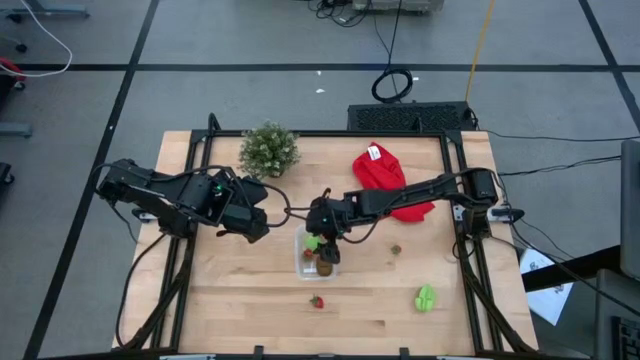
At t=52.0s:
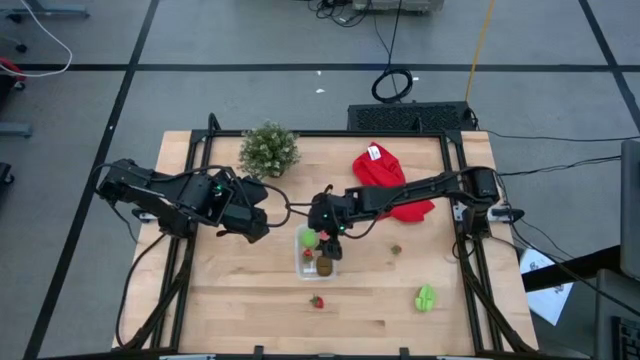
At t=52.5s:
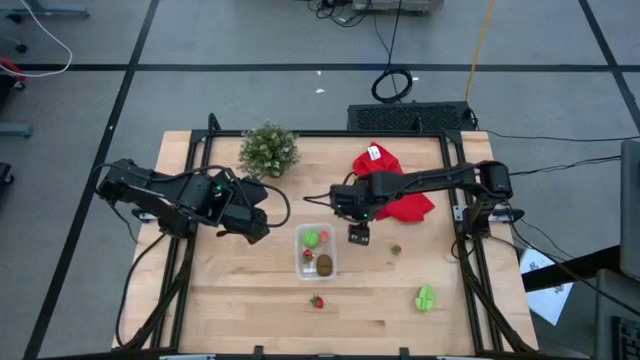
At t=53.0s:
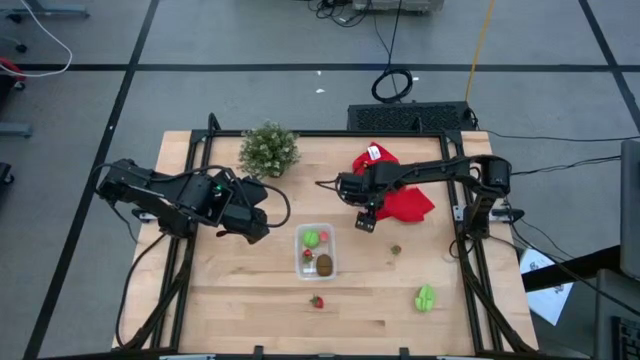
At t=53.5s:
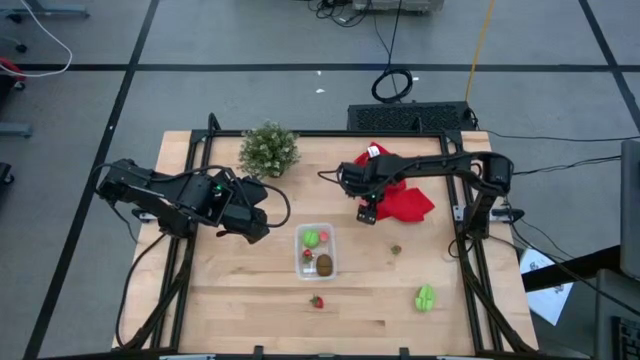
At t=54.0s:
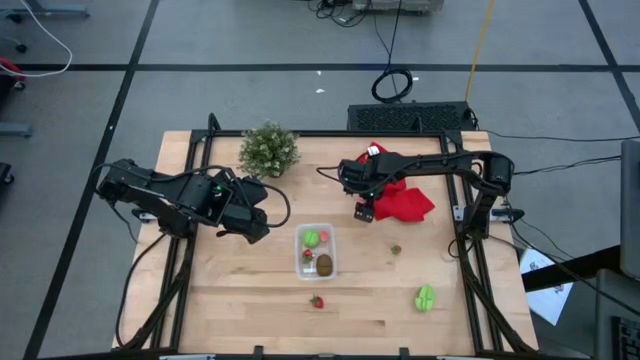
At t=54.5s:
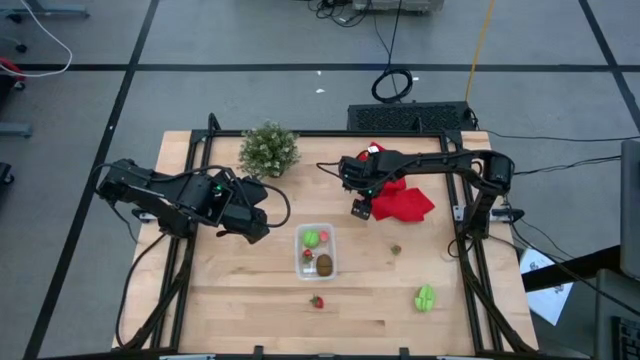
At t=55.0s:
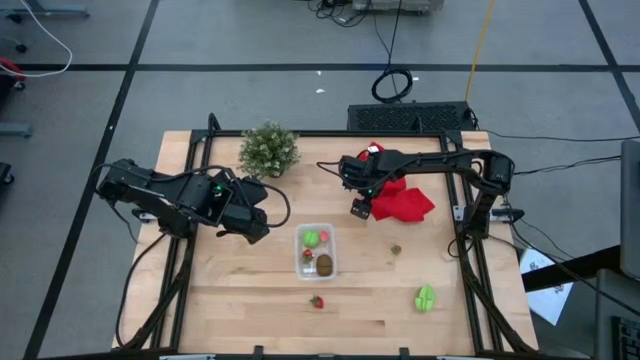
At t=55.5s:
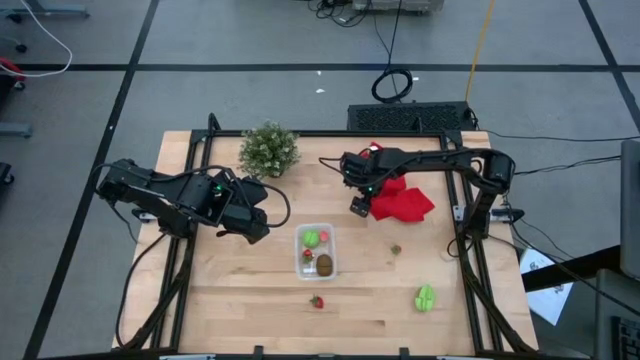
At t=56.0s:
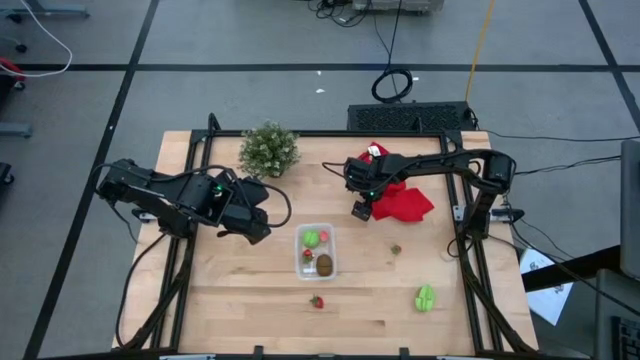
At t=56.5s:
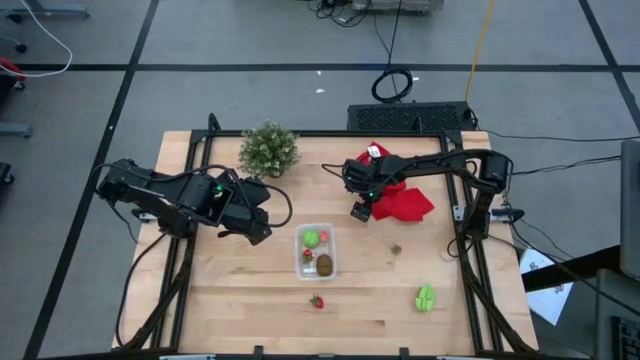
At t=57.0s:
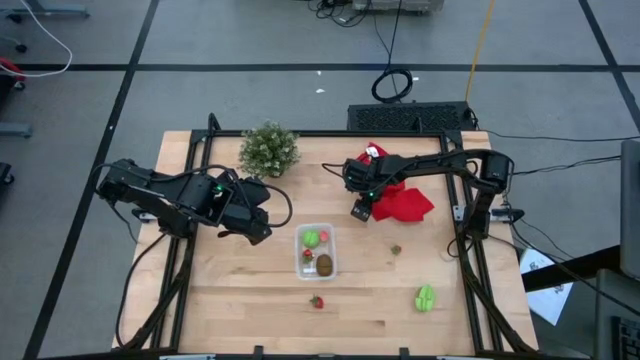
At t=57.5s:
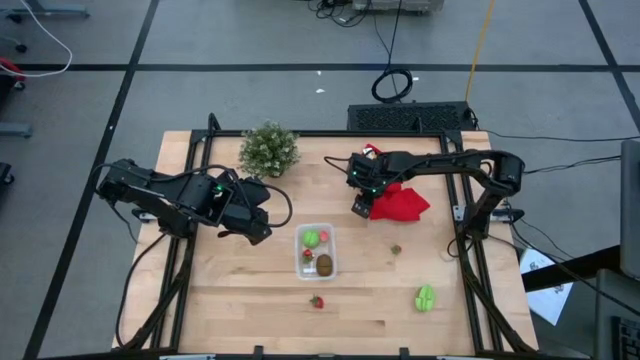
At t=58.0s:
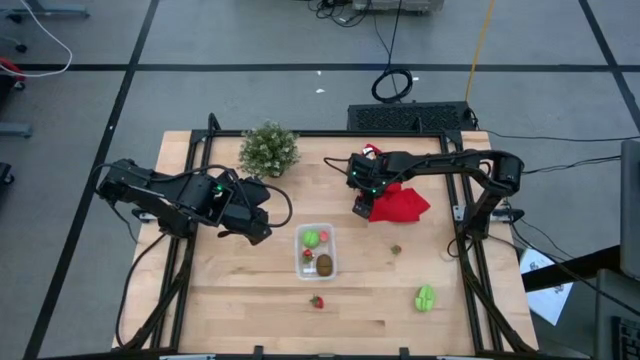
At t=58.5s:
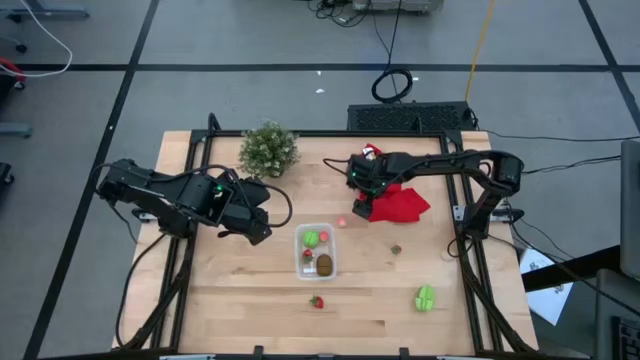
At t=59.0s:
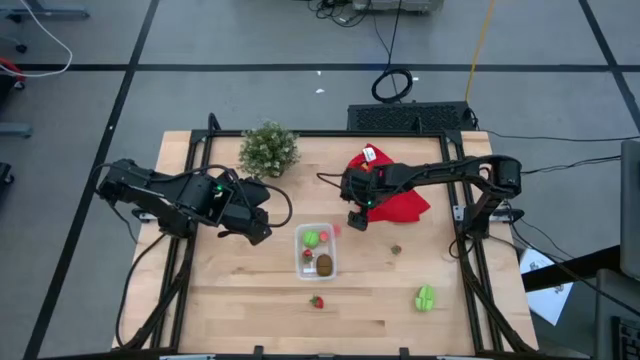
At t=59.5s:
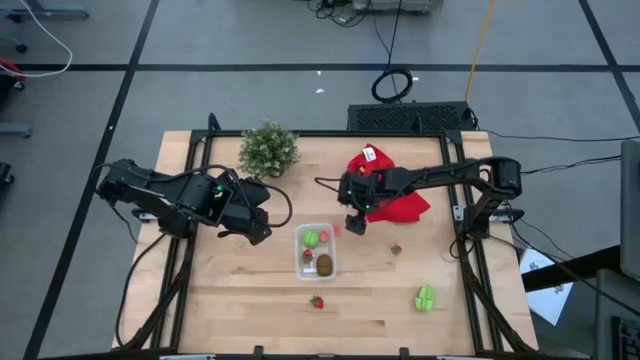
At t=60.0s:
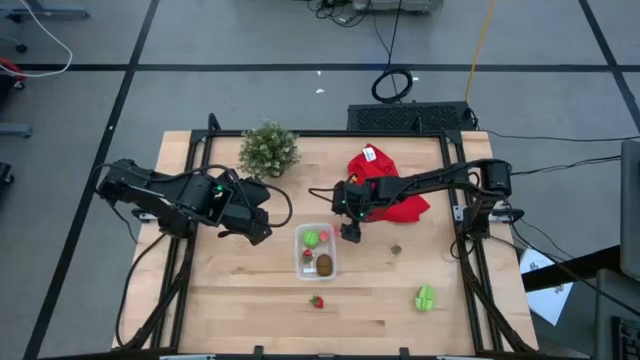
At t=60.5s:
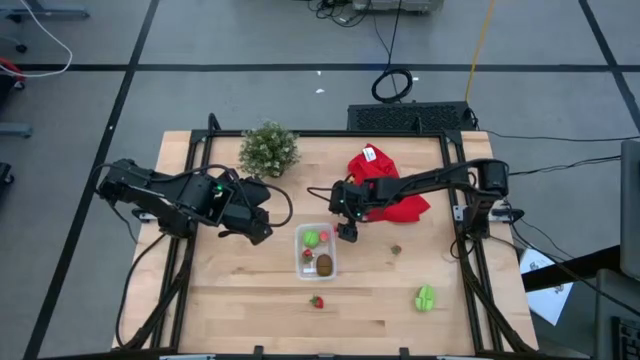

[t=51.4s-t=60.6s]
Task: Pick and placing Produce into tupperware
Put the pink peach into the transparent bin

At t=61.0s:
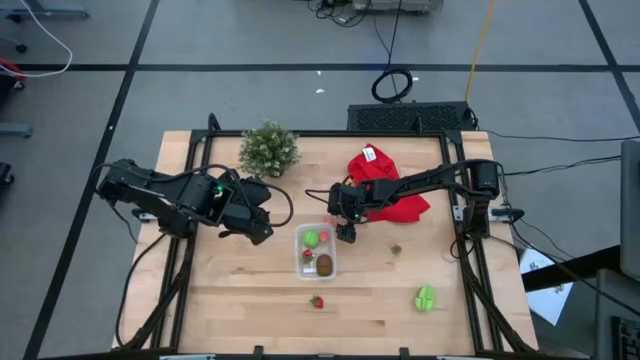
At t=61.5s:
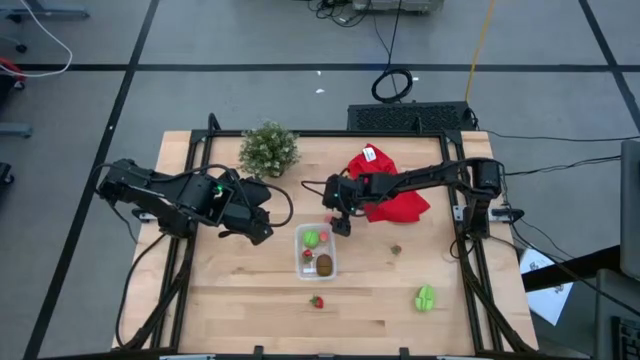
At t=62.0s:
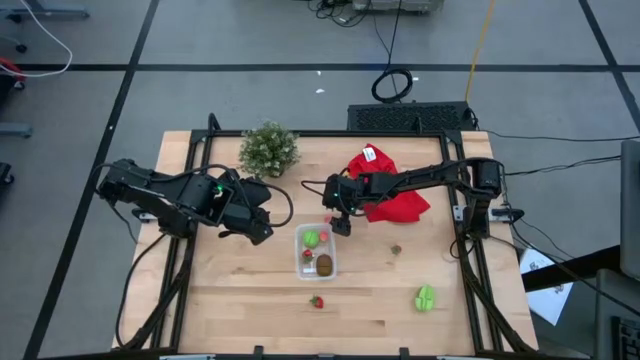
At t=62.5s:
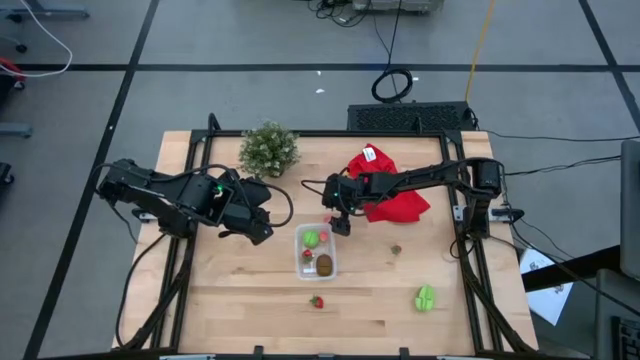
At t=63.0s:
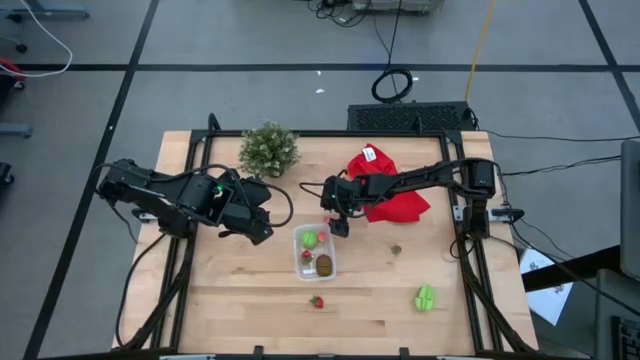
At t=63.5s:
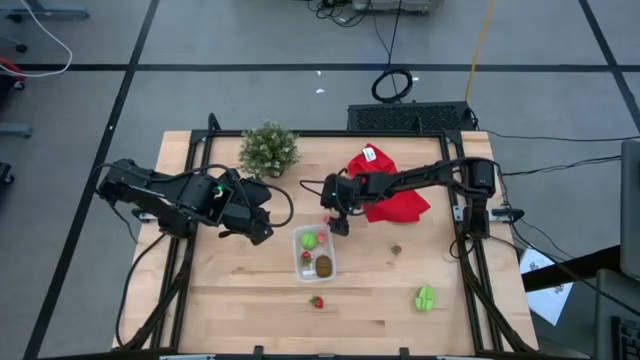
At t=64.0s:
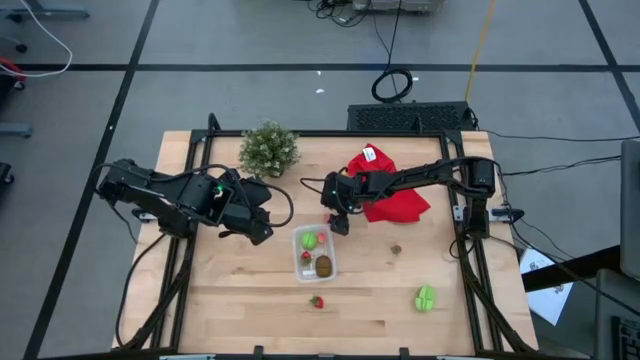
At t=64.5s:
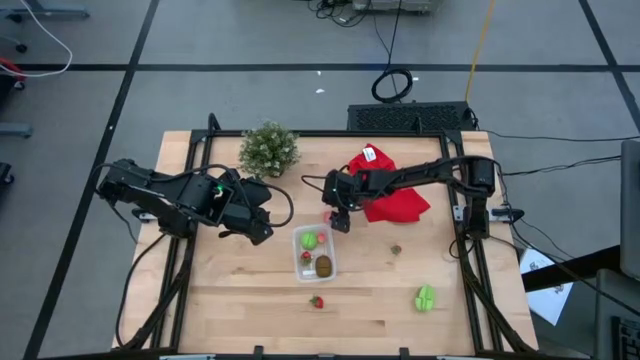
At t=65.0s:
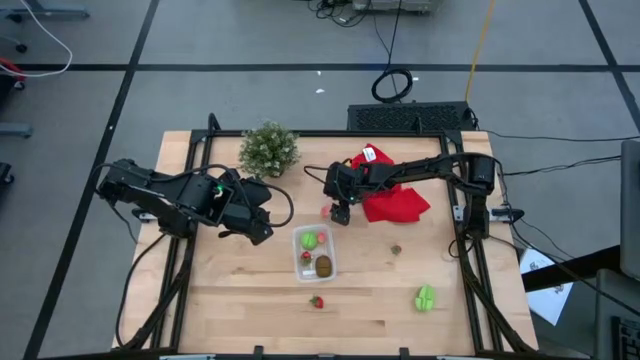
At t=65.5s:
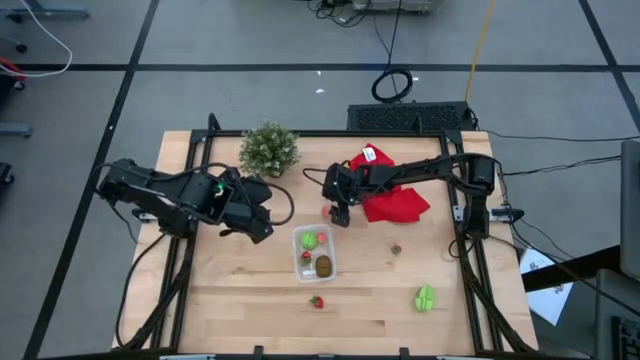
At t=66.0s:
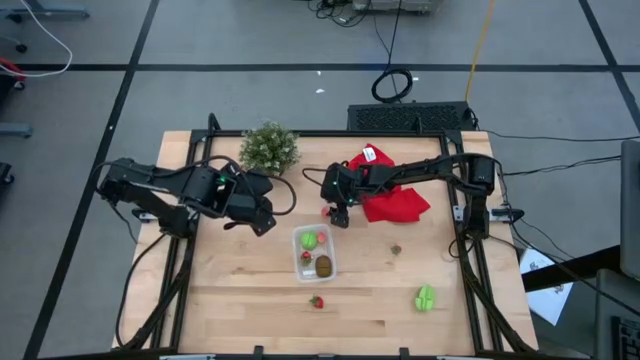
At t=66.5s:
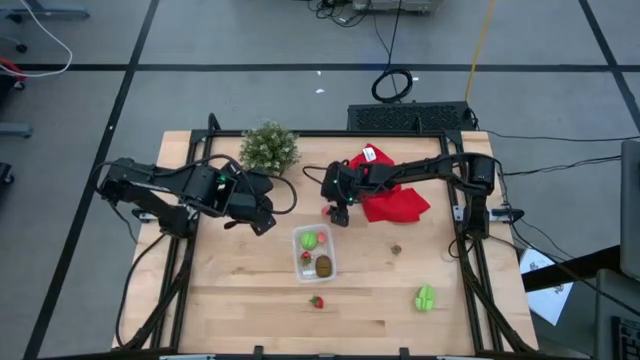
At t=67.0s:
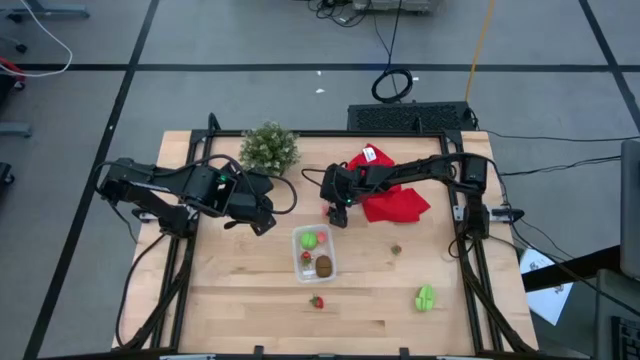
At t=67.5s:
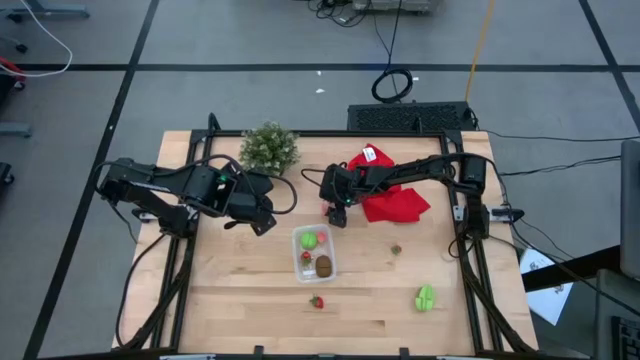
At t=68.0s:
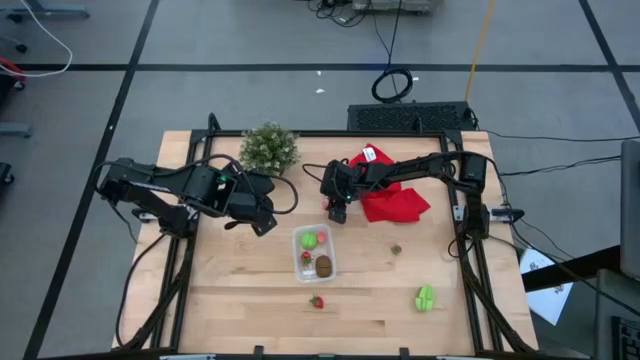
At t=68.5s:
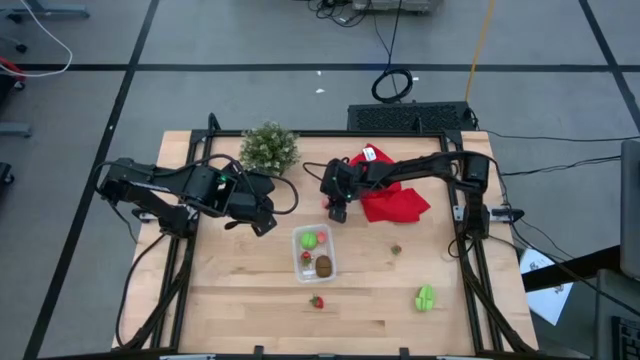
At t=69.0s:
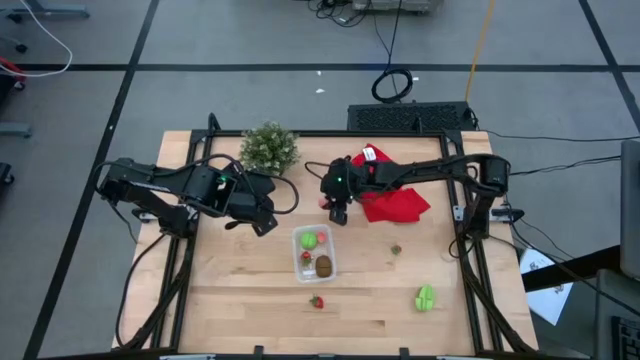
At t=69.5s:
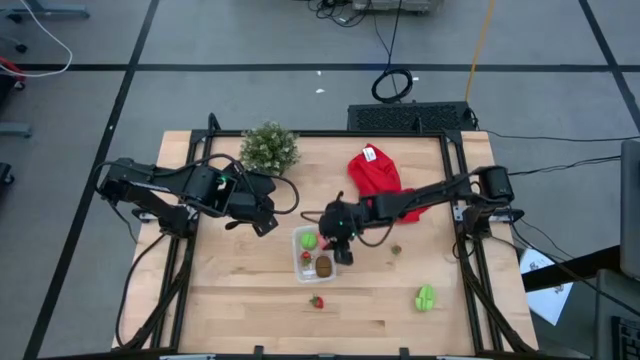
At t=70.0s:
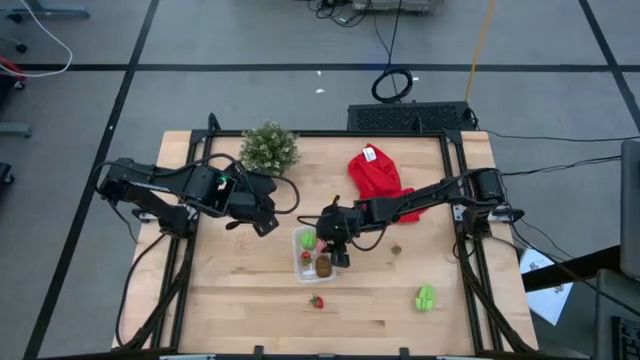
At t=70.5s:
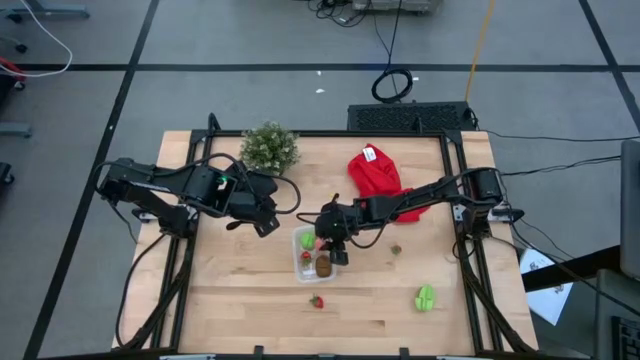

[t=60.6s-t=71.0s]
Put the pink peach into the transparent bin

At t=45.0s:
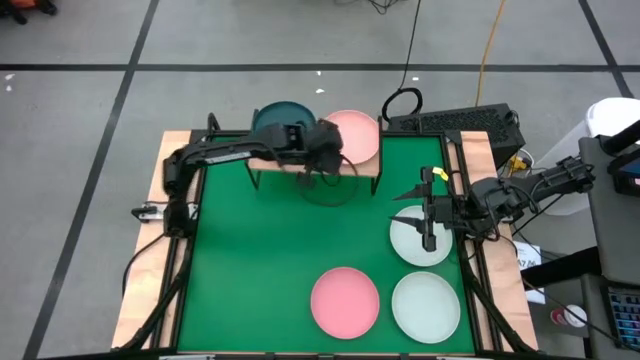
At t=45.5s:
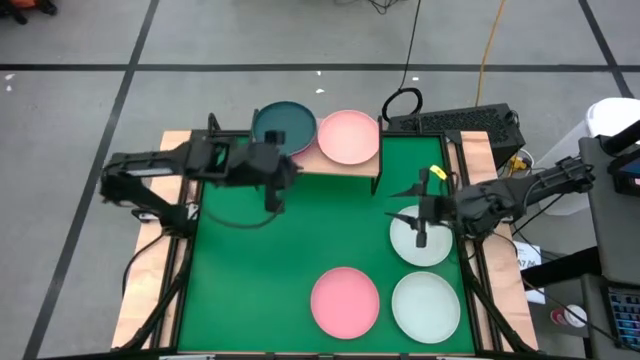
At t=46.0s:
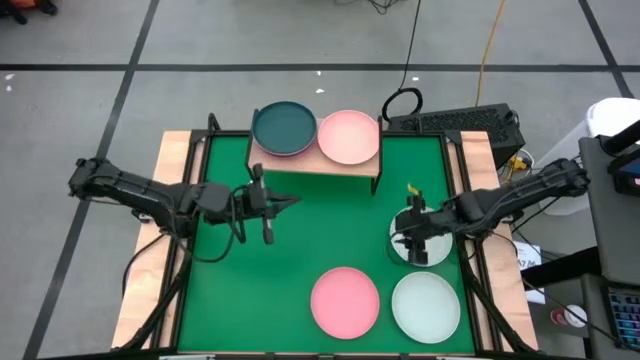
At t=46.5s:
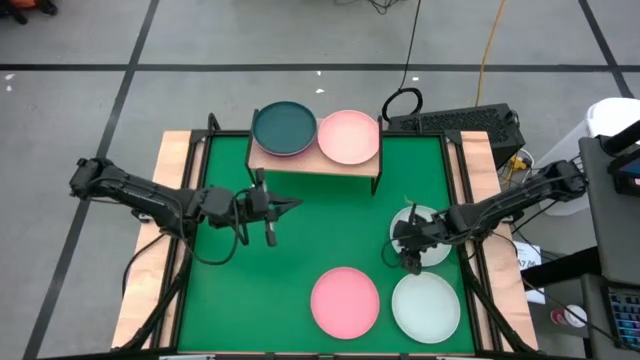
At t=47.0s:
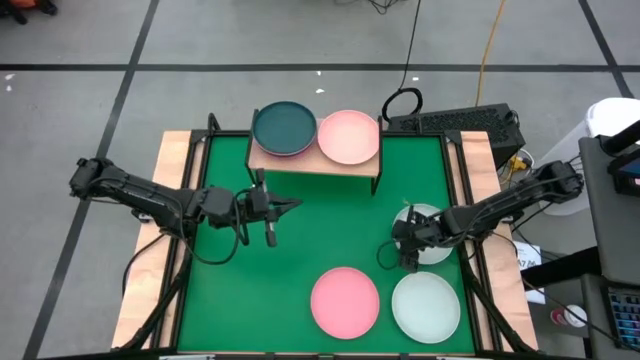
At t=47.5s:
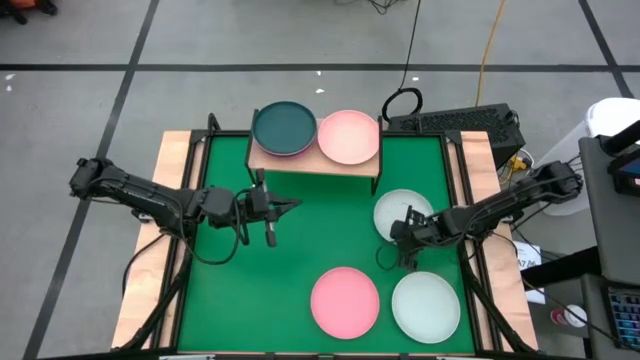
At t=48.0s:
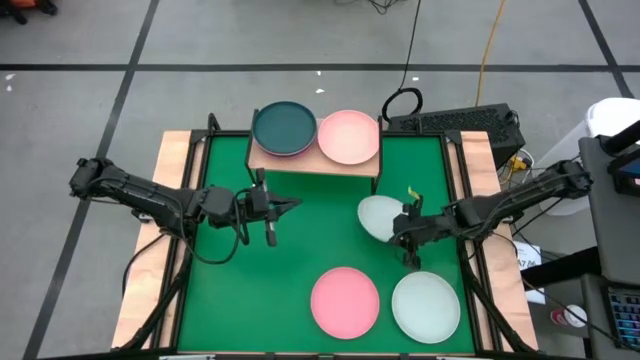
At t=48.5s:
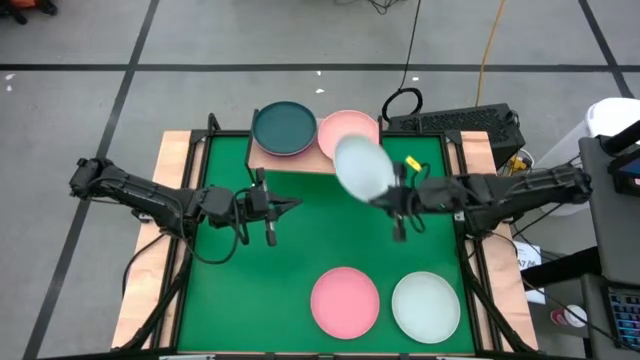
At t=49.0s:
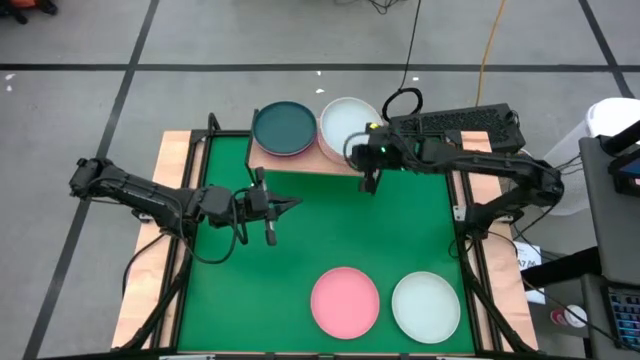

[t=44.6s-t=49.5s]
Task: Place and stack plates onto a shelf
Stack the top blue plate on top of the light pink plate on the shelf
